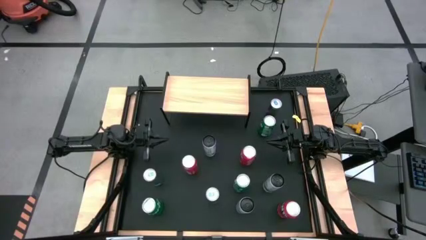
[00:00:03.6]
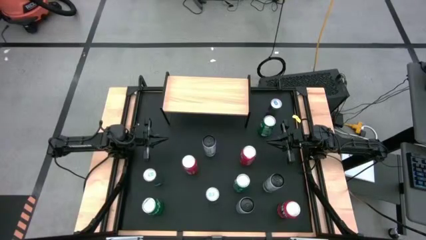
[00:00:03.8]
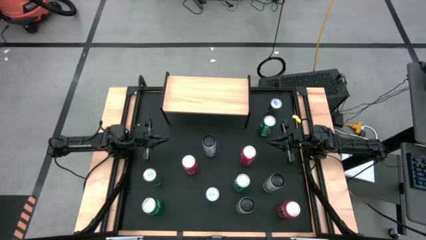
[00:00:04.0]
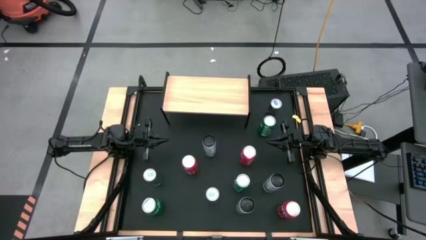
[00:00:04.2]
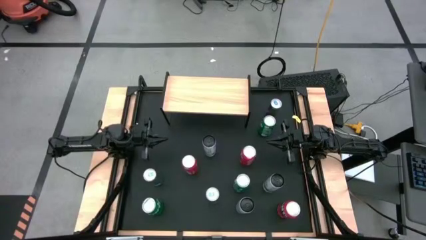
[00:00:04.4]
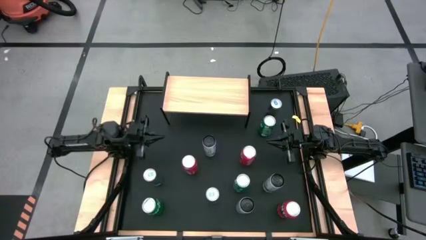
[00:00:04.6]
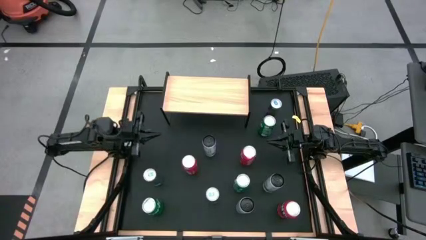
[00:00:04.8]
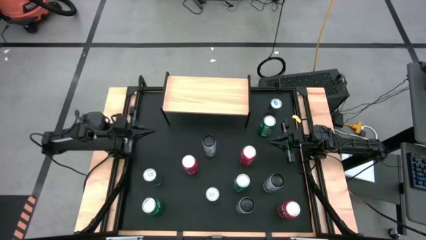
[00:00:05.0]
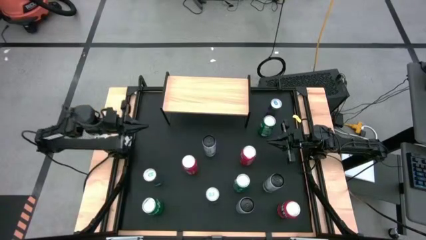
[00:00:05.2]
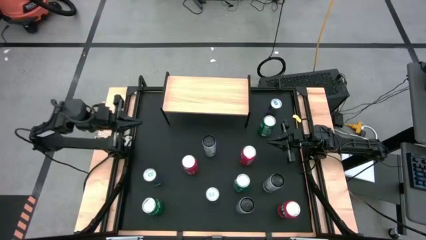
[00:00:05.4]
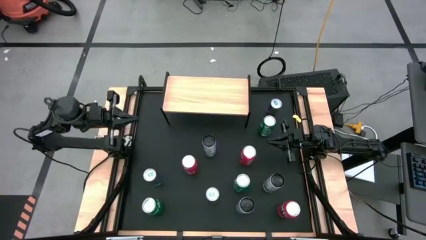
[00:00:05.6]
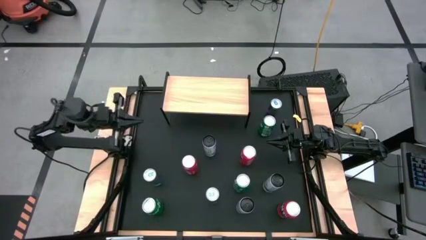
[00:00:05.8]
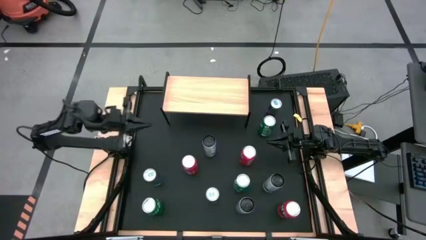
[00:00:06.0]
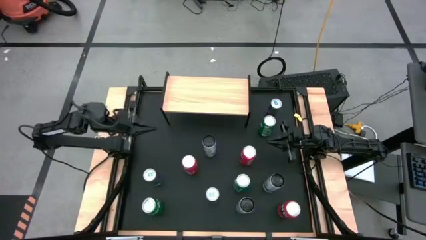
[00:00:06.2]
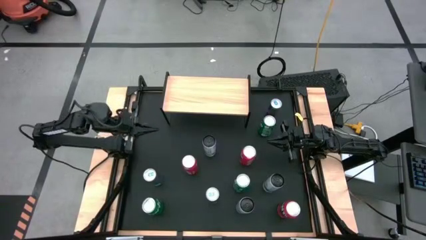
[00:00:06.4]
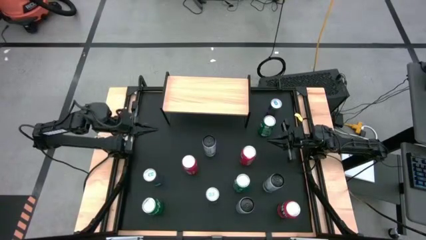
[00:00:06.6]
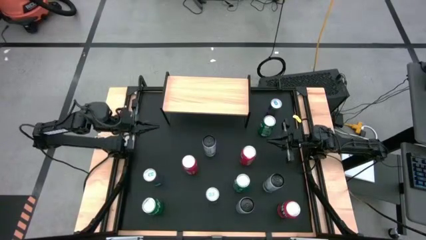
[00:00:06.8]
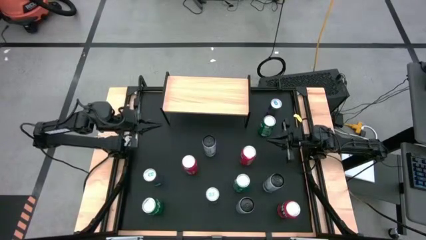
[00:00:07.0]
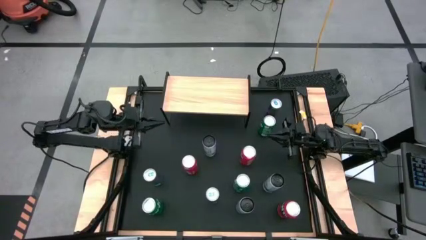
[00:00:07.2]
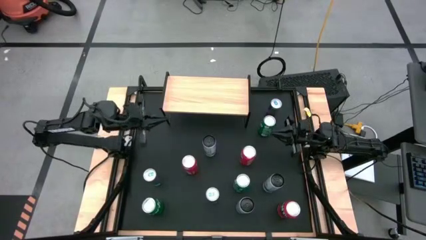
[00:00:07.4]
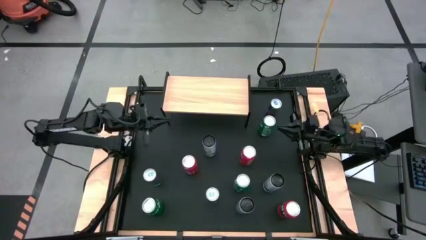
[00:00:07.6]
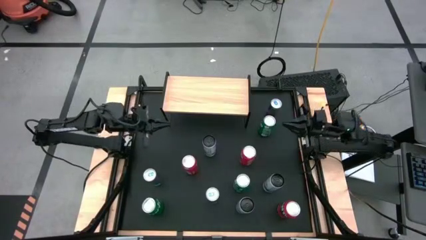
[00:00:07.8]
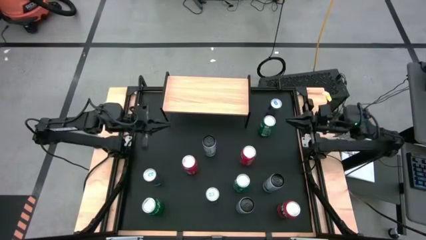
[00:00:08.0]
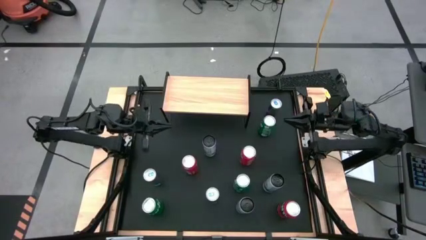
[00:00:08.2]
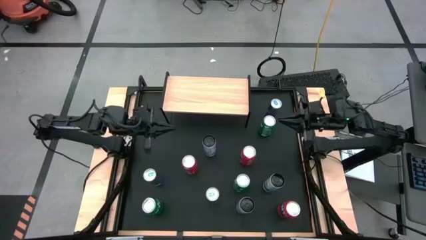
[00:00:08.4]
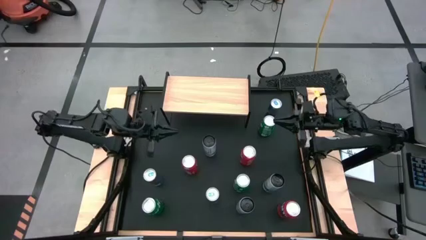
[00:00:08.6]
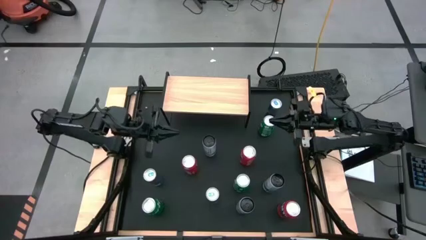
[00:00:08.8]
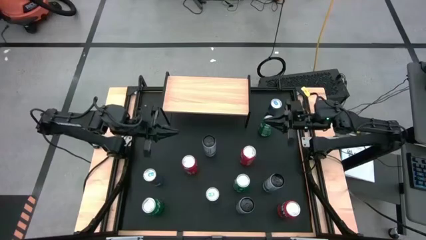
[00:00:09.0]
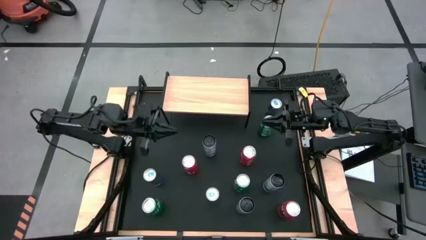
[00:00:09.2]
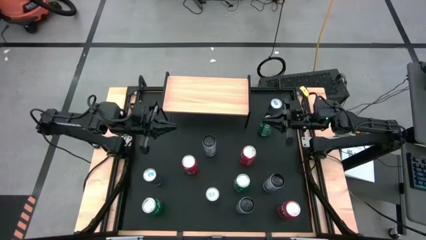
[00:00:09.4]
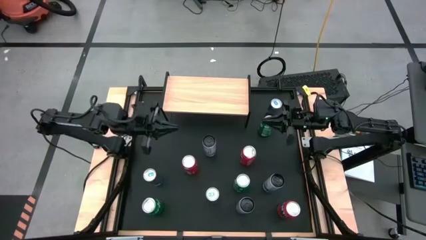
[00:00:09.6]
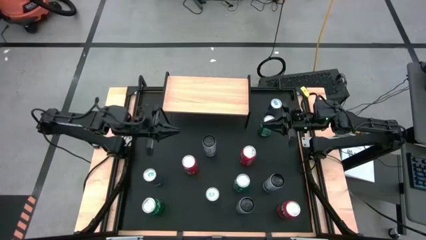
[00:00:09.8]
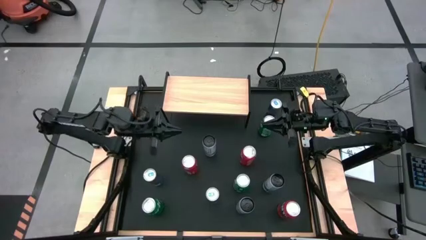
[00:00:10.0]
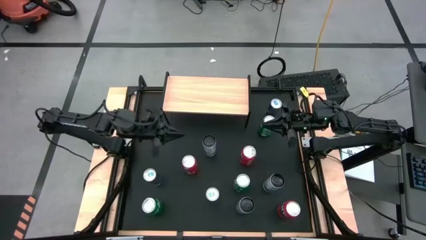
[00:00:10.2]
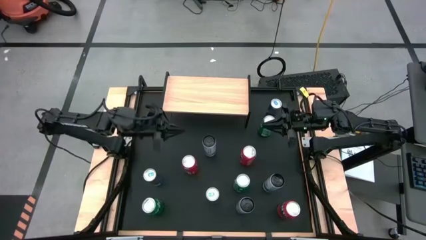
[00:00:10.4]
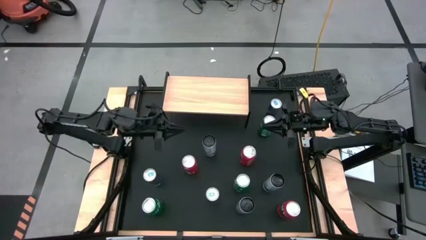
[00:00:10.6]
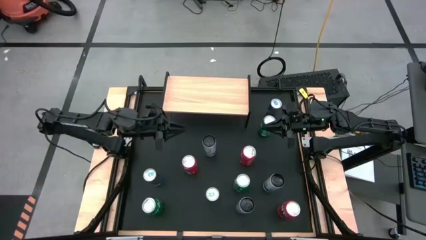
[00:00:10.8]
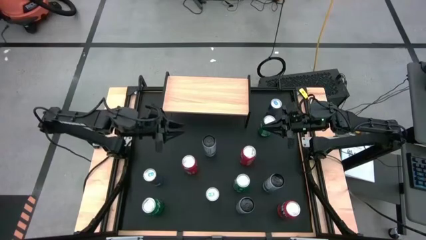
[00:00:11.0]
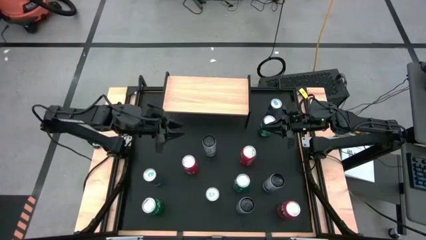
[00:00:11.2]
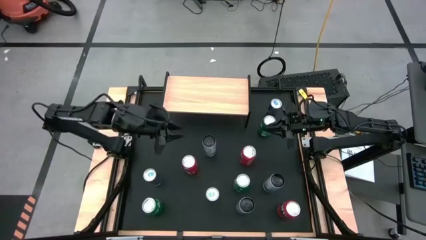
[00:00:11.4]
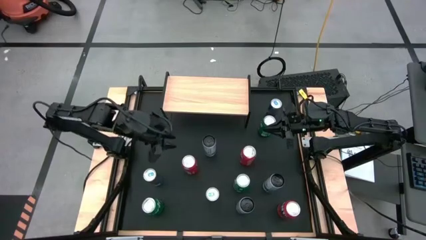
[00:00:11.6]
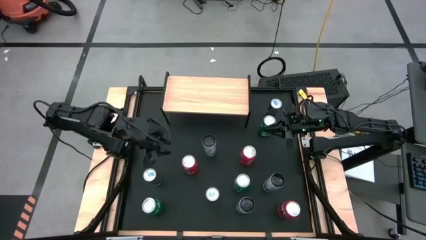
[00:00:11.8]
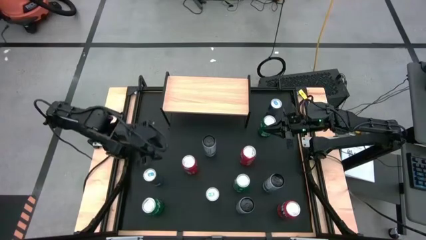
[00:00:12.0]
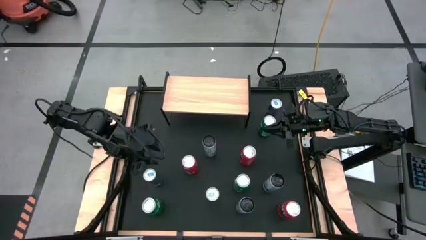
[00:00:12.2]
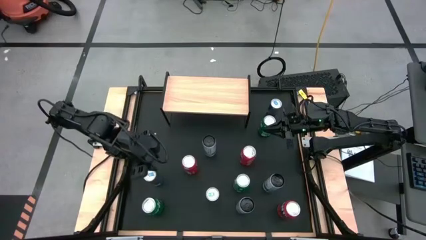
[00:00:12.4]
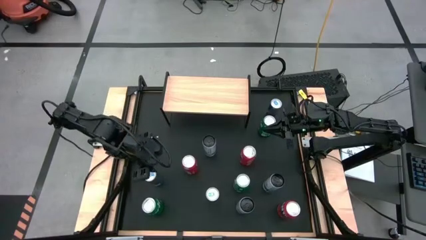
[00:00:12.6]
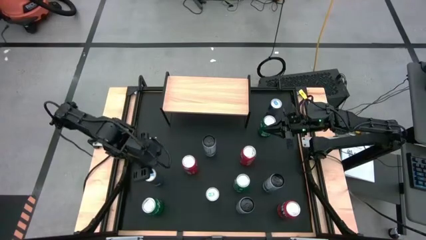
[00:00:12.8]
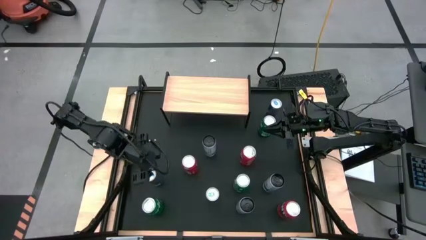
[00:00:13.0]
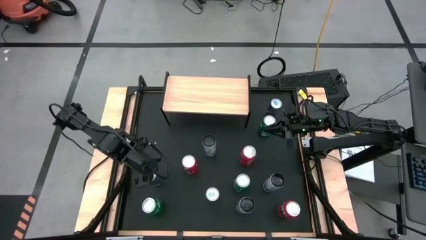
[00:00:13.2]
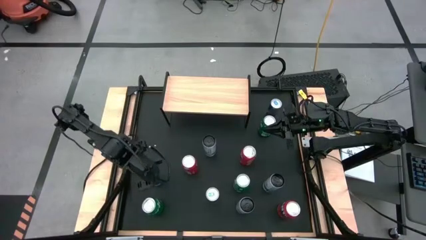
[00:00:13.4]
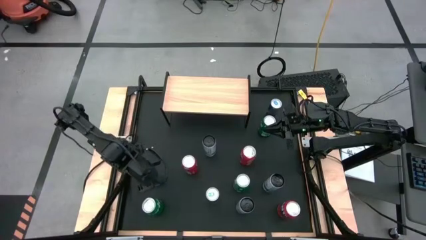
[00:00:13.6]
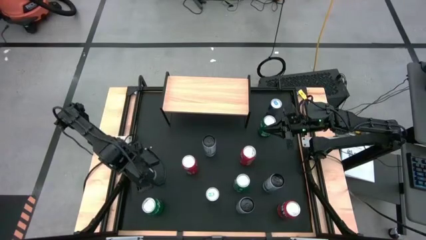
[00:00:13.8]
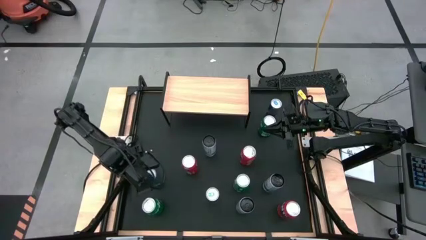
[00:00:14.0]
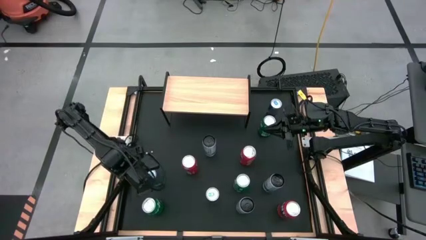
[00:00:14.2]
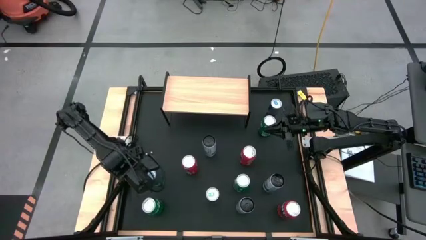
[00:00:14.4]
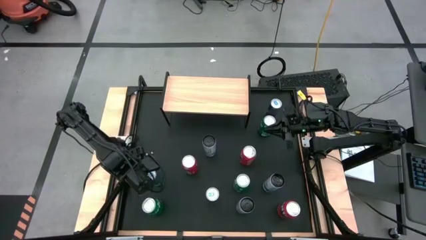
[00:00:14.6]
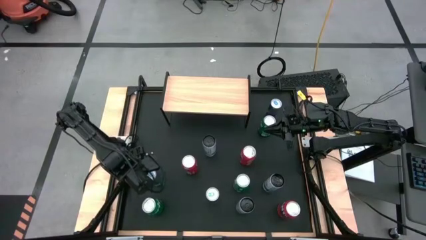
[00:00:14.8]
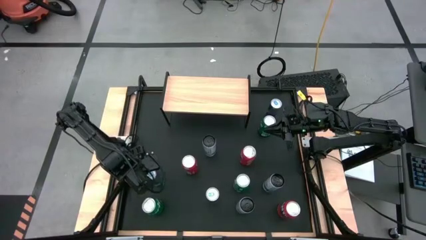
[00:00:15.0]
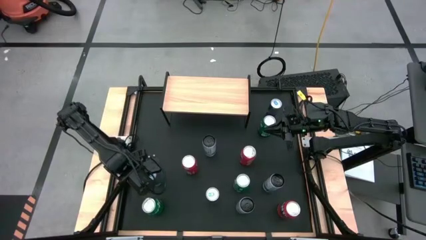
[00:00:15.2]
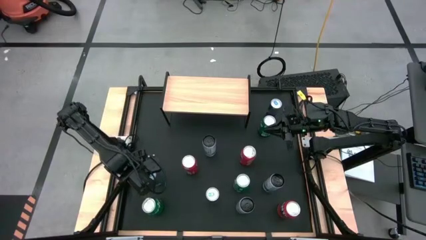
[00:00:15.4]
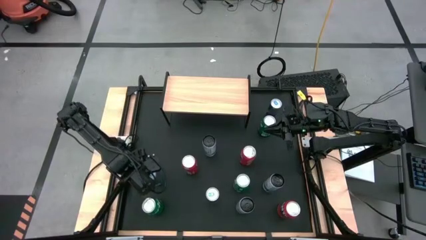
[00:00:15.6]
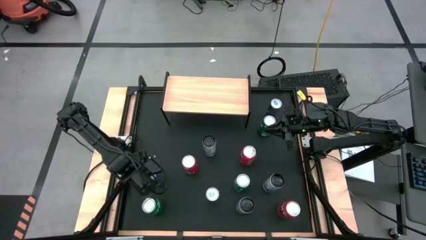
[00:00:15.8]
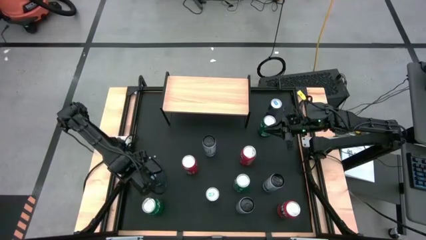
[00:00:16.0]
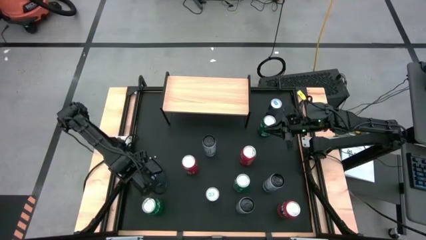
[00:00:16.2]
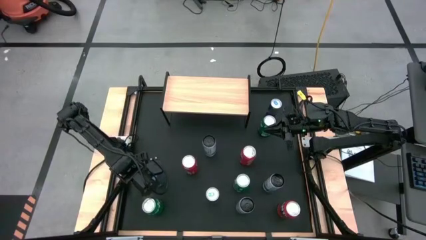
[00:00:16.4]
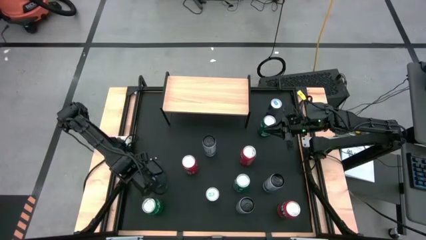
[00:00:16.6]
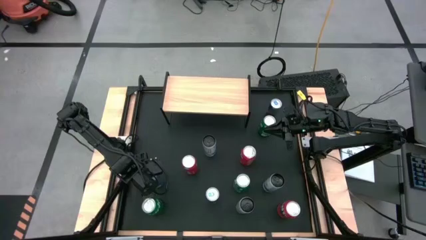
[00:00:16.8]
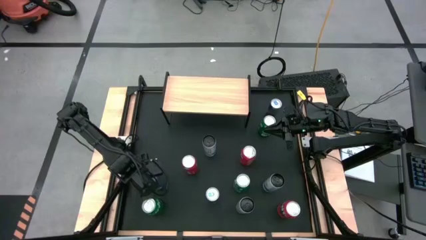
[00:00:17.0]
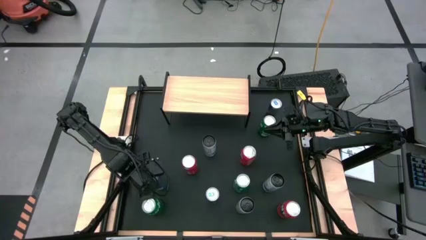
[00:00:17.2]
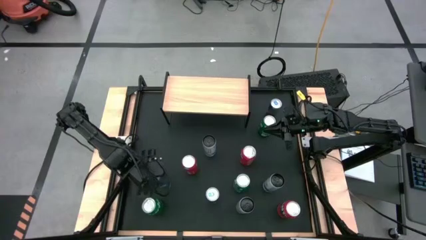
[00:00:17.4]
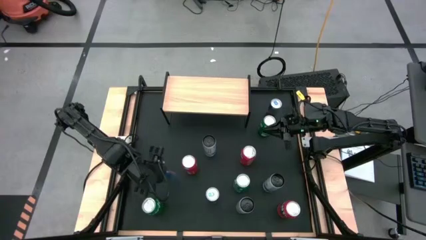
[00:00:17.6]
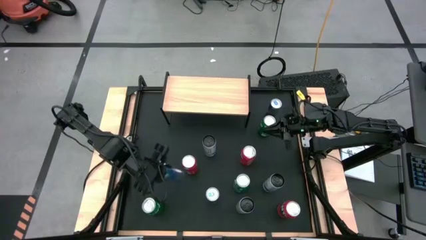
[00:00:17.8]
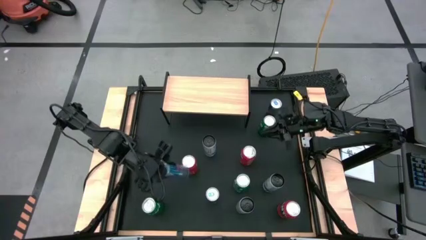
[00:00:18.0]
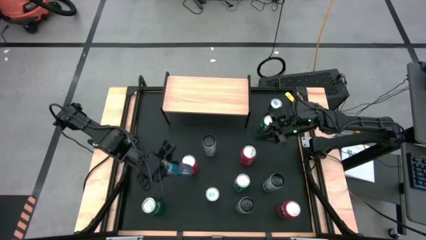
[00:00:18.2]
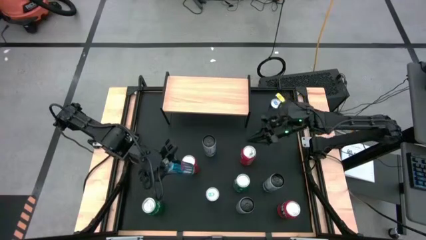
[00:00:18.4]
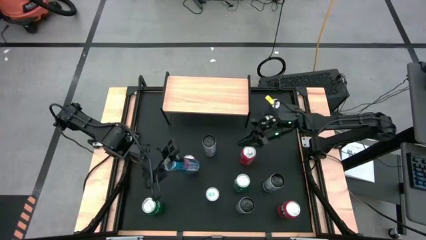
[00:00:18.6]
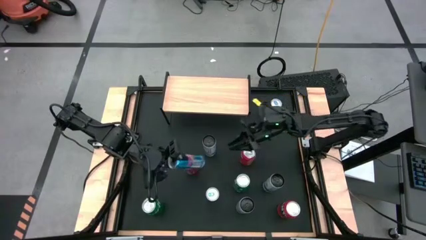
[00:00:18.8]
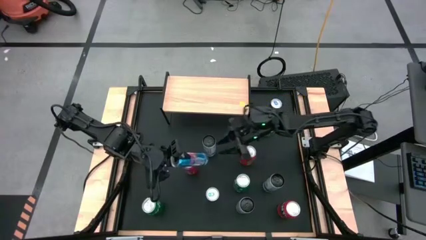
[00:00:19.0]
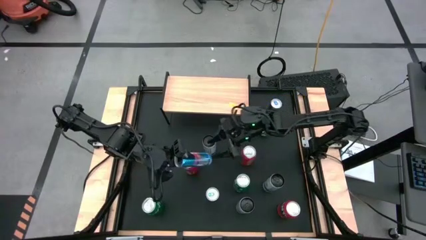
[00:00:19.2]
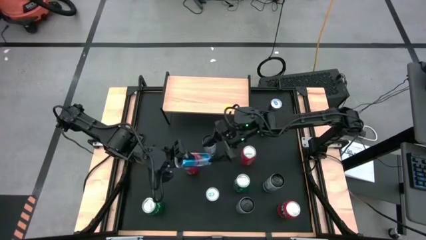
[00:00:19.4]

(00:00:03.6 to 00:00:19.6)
Task: Place canned beverage on shelf
Put the bottom left blue soda can on the shelf
